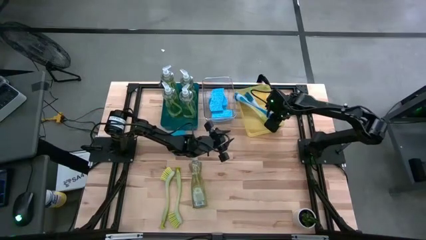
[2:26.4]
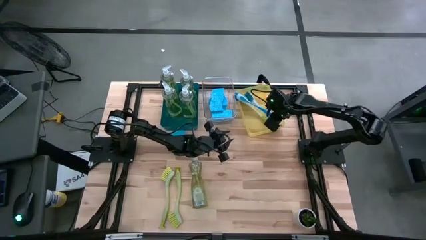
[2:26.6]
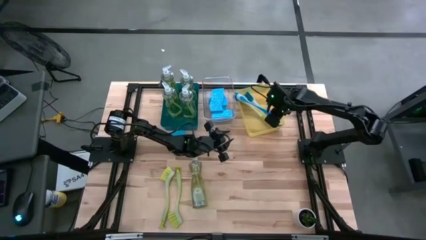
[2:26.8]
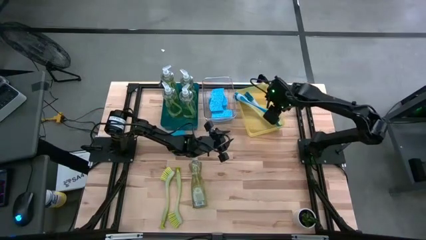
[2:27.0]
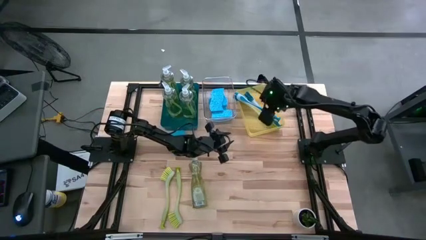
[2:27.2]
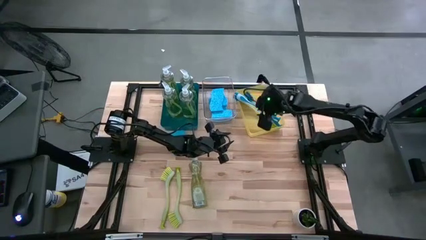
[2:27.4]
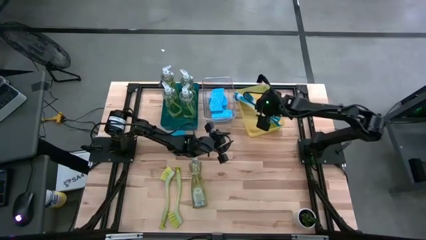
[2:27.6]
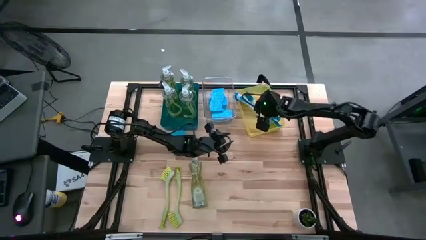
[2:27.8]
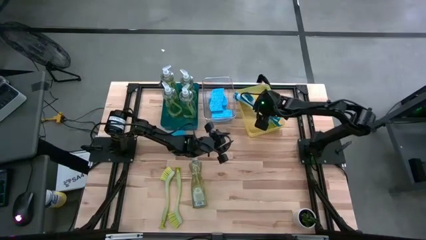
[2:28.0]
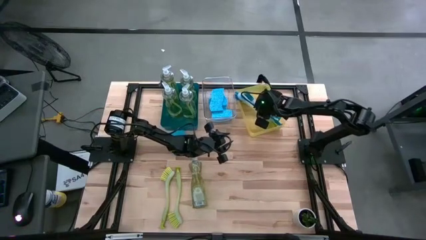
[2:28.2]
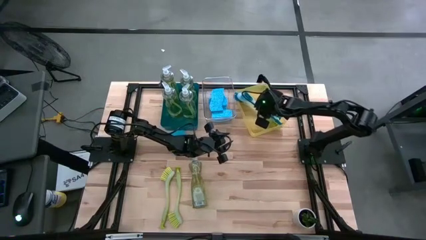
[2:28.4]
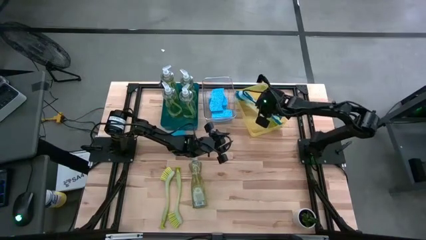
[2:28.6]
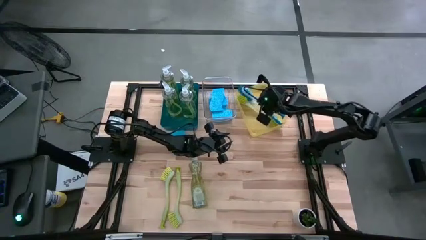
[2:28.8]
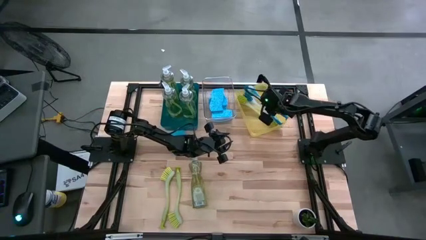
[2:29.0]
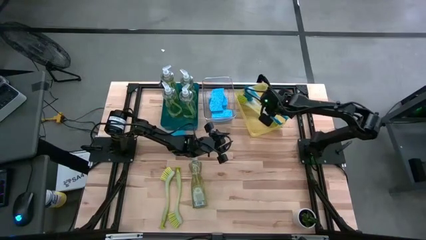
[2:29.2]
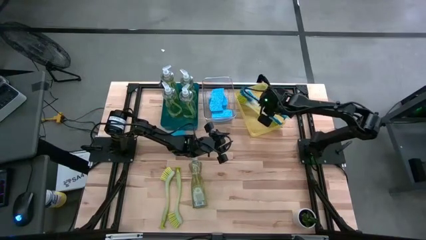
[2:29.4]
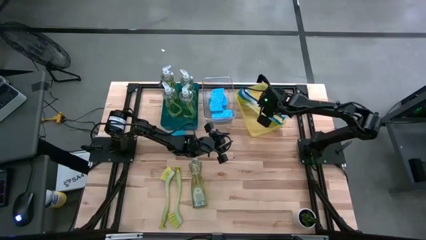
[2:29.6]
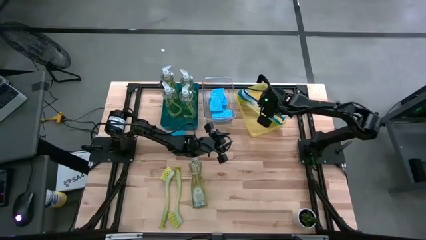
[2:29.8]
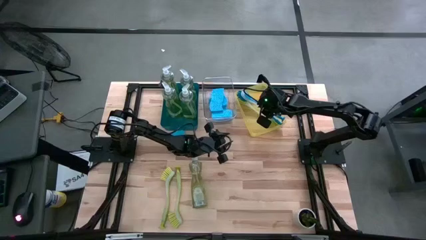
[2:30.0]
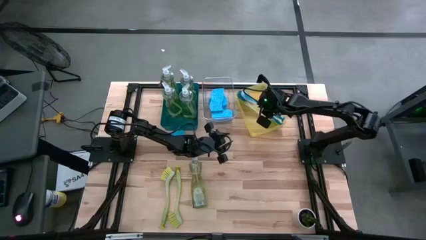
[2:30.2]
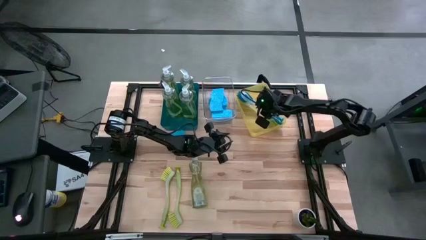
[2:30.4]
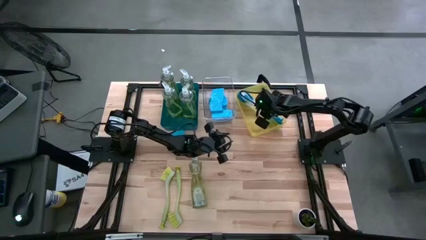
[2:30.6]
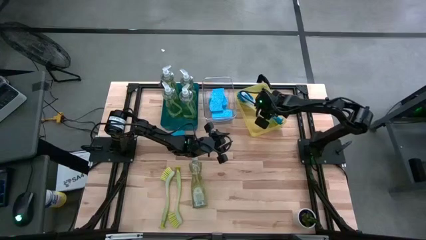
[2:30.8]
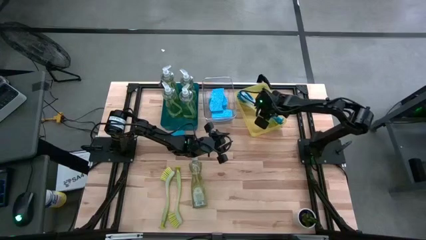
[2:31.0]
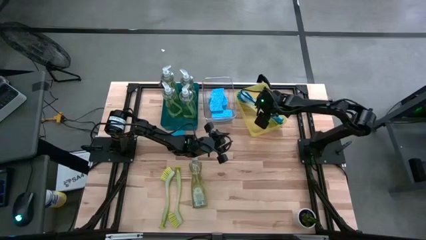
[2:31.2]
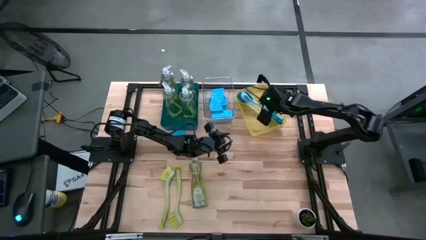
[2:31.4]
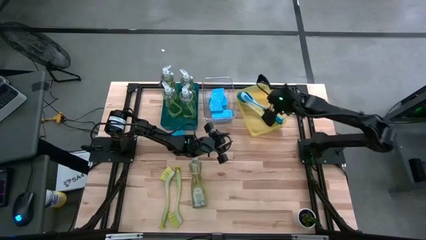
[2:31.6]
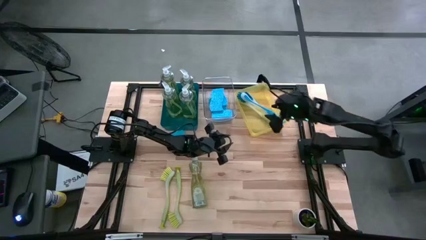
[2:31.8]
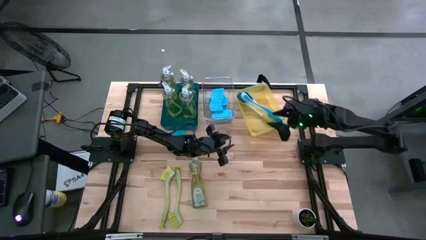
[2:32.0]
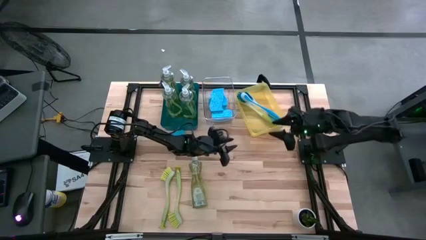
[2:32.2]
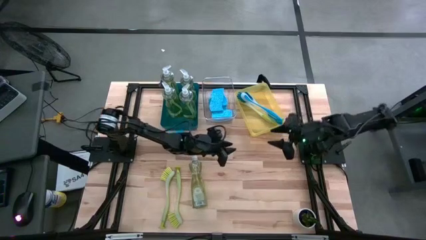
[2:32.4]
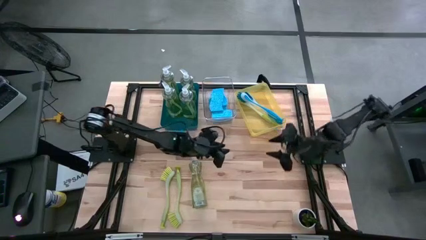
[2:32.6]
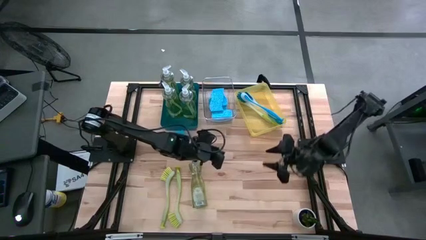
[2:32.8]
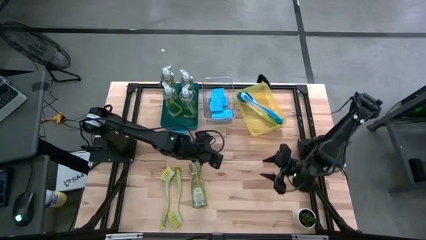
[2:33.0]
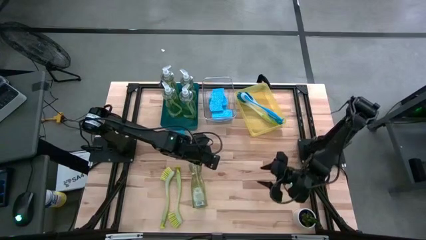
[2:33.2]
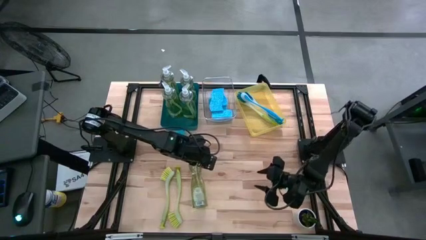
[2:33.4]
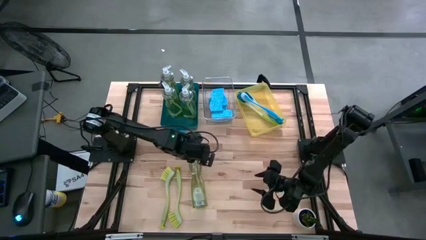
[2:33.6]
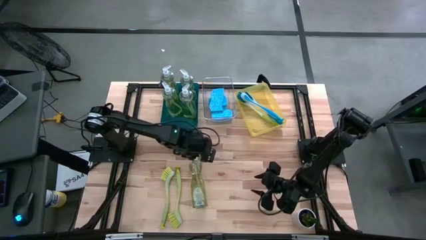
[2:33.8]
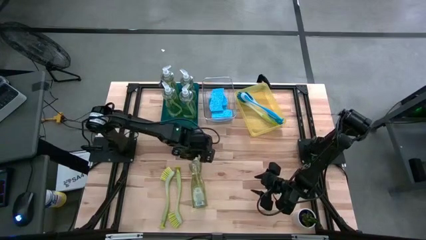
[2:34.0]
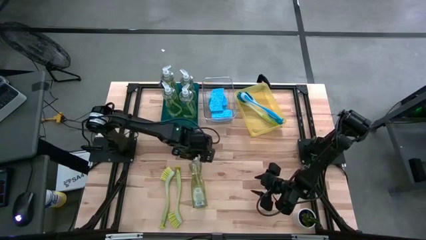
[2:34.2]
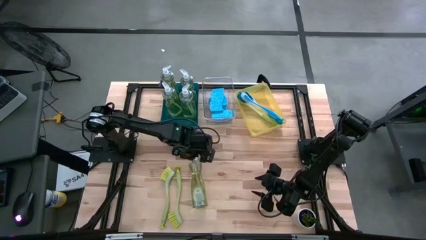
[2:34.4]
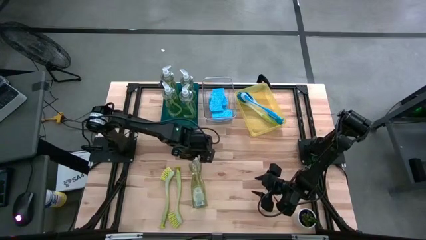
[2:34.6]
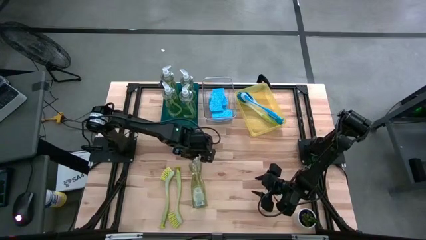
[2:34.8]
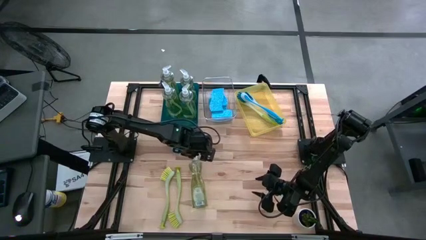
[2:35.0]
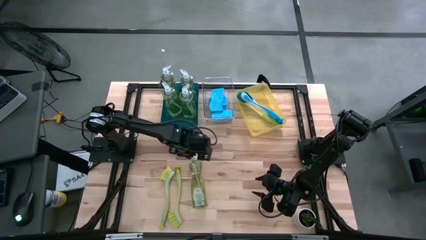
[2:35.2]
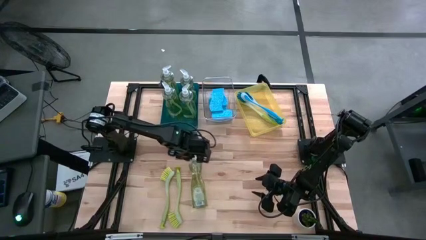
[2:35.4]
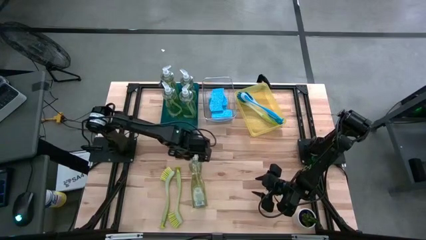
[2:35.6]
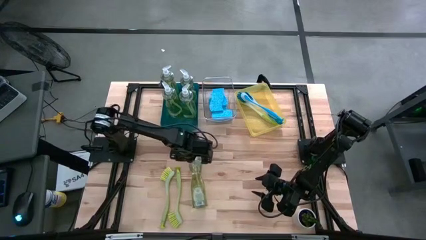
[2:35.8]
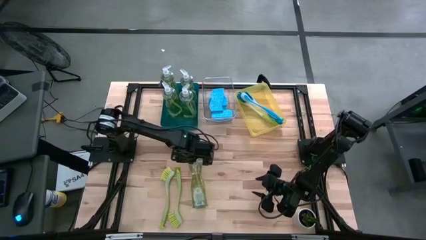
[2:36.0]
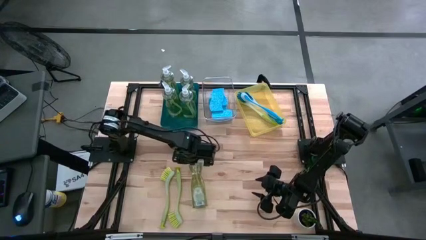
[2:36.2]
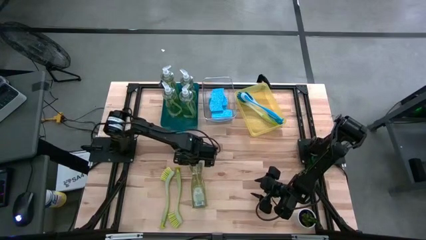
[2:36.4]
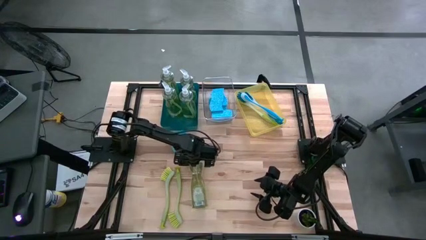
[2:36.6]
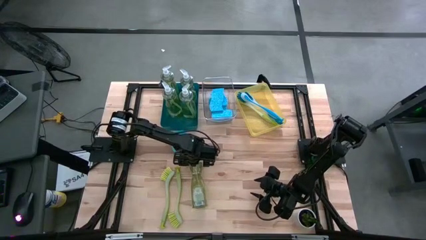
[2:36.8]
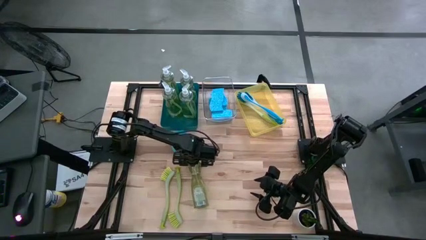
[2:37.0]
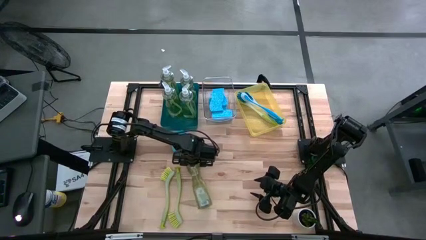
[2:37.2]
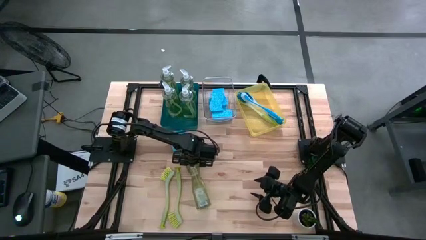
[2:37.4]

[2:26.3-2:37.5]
Task: Pick & Place Kitchen Sink Supplies
Put the dishwashing liquid into the blue bin

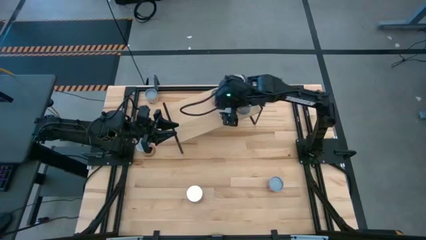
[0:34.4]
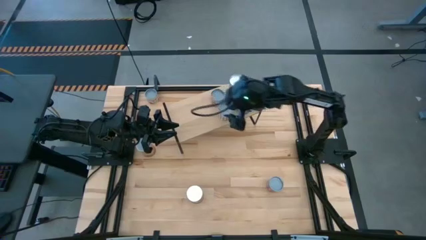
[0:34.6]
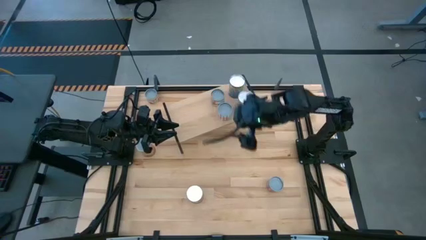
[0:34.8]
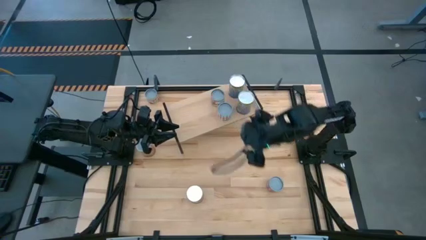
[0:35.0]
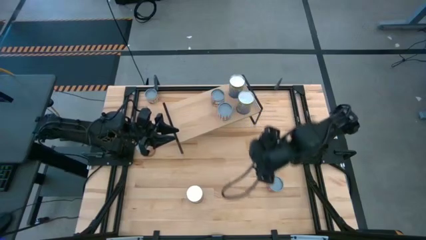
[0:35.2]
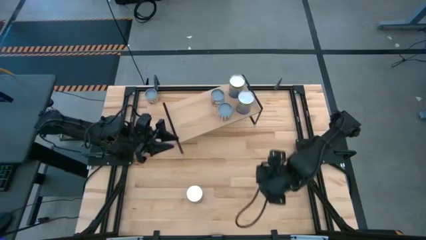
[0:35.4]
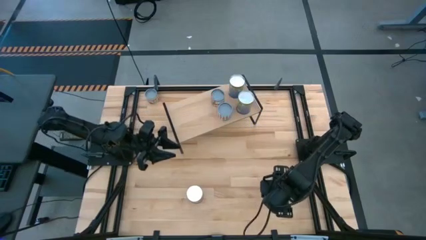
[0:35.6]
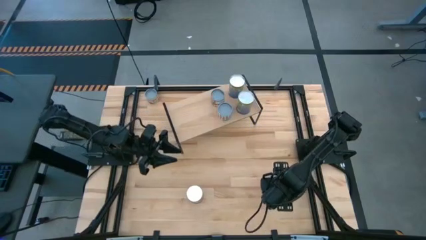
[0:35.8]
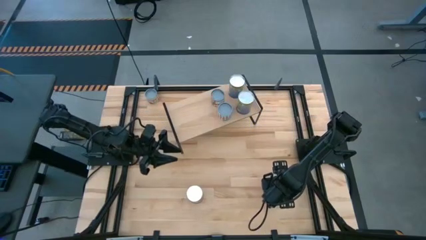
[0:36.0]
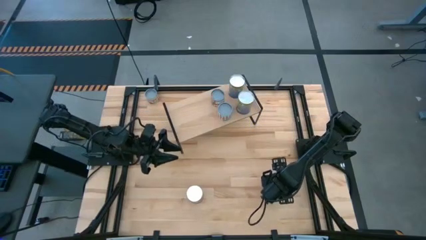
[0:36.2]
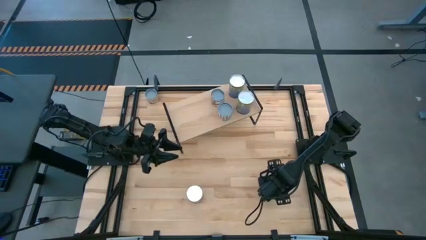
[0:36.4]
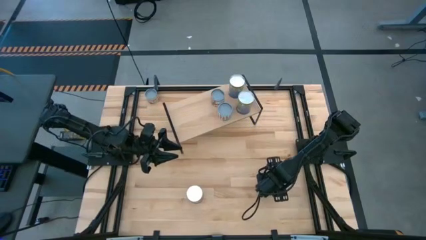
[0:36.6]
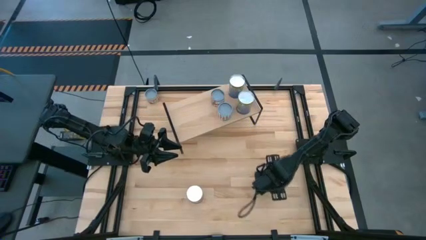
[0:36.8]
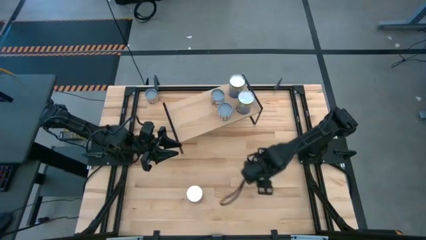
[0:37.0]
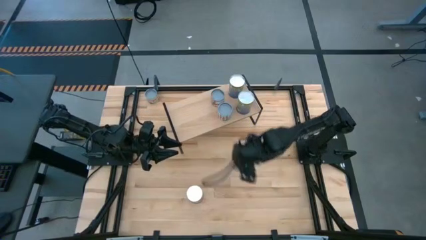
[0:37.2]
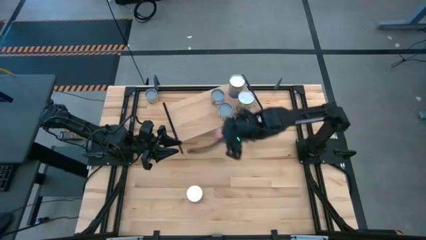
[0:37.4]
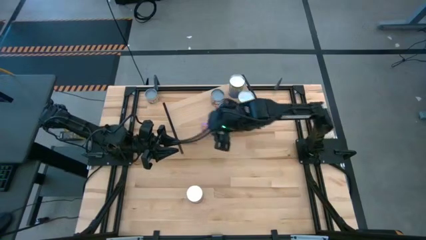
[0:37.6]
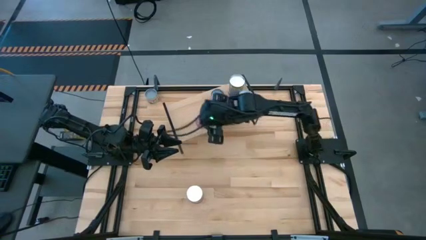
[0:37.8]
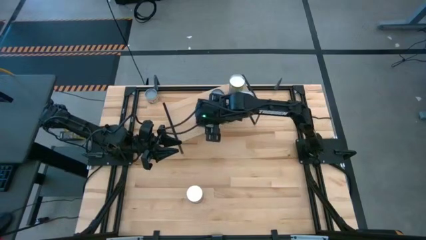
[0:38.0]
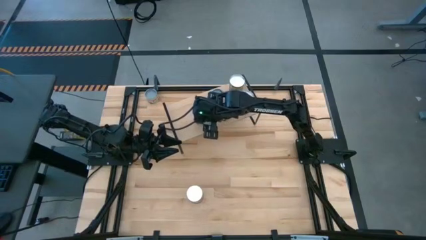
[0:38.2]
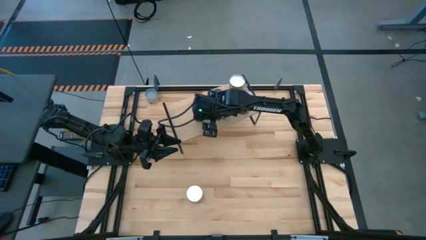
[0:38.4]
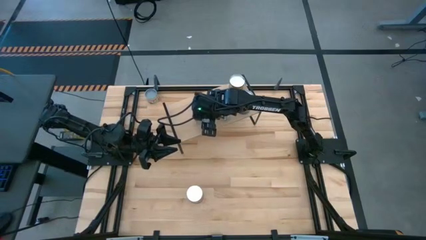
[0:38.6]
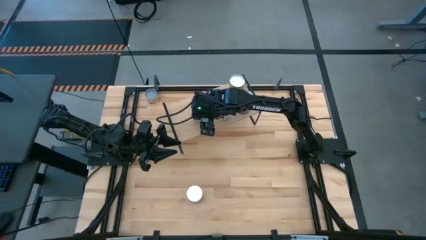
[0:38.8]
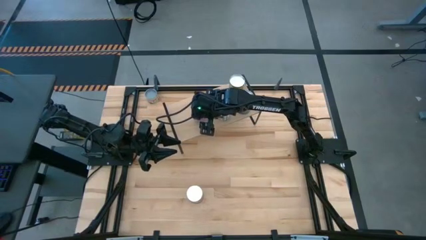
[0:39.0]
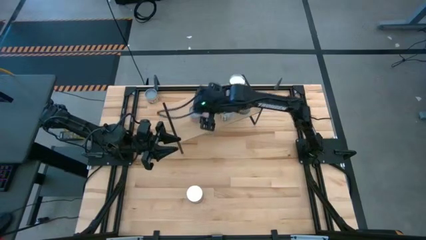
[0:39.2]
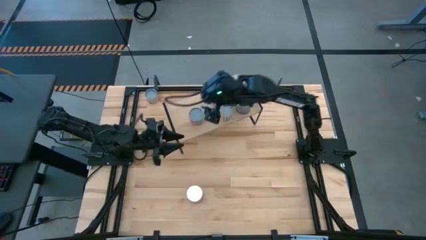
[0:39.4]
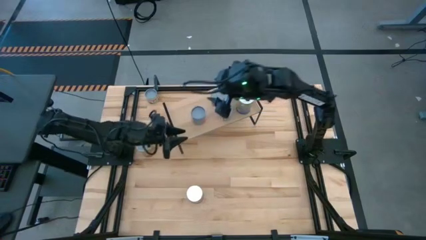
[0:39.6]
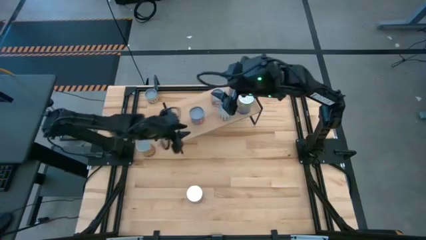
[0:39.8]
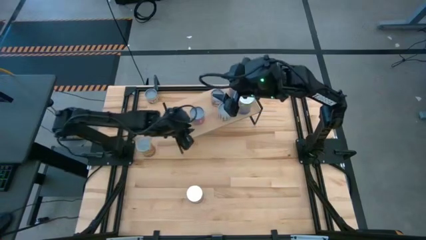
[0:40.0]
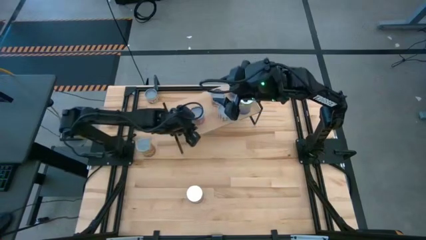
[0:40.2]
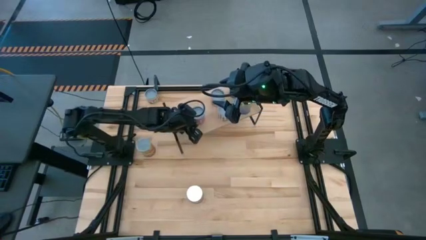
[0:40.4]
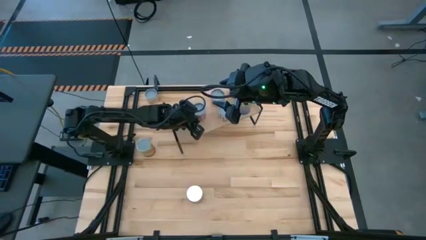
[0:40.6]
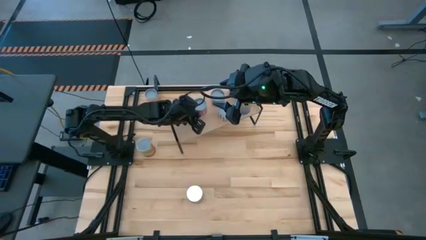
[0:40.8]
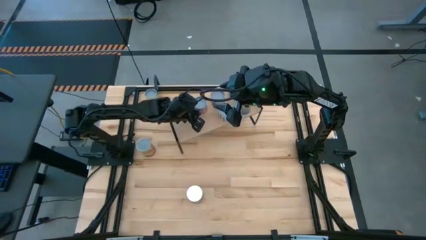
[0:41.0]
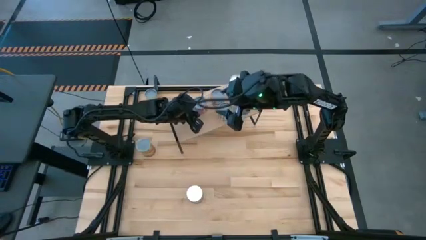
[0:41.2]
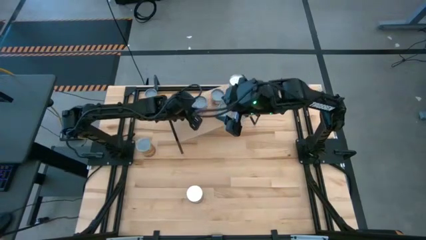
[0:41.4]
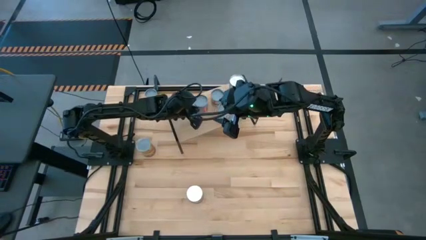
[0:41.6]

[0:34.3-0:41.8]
Task: Pick and place cans onto a shelf
Put the canned mixed vegetables on the shelf
